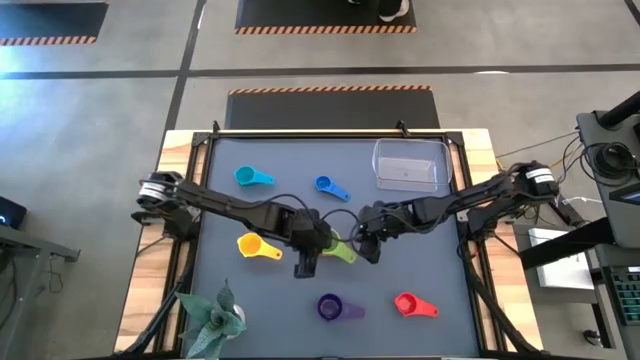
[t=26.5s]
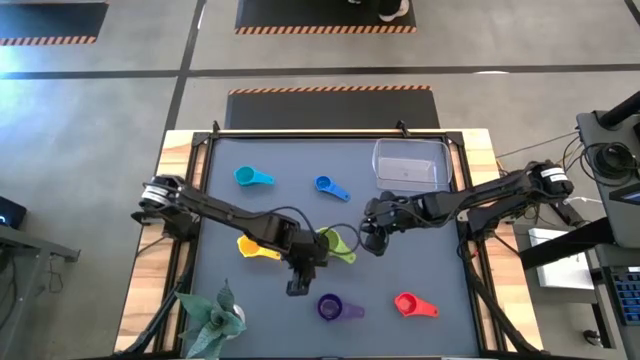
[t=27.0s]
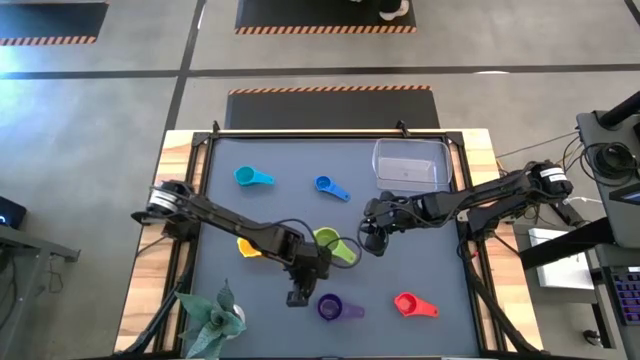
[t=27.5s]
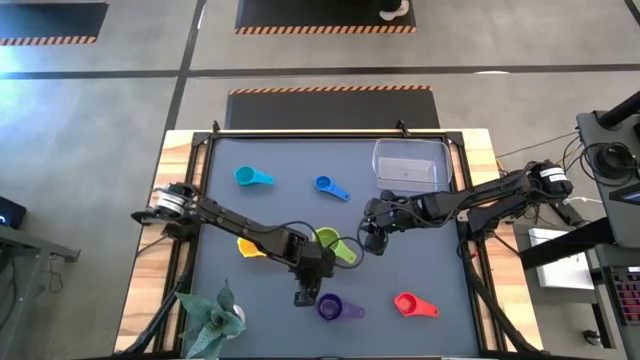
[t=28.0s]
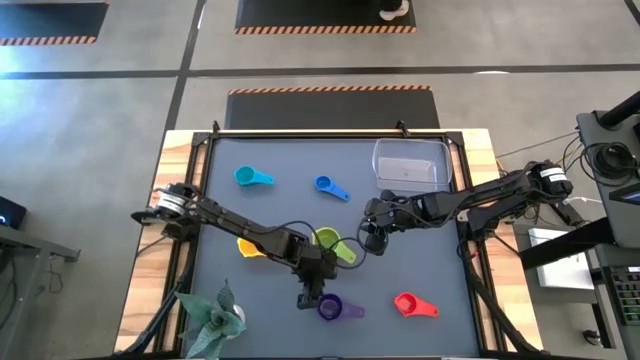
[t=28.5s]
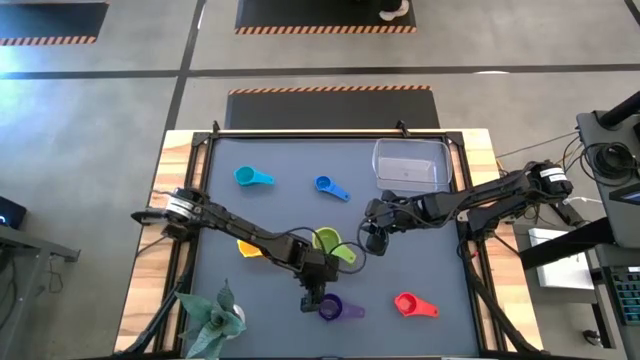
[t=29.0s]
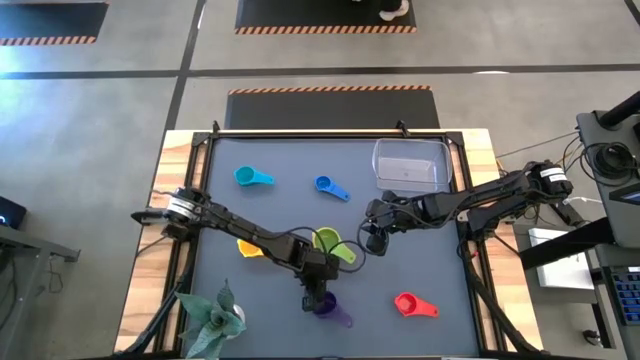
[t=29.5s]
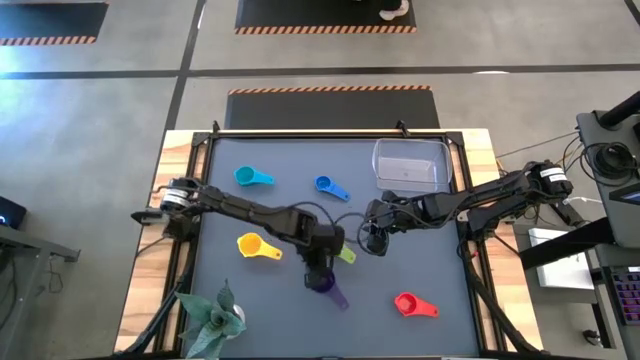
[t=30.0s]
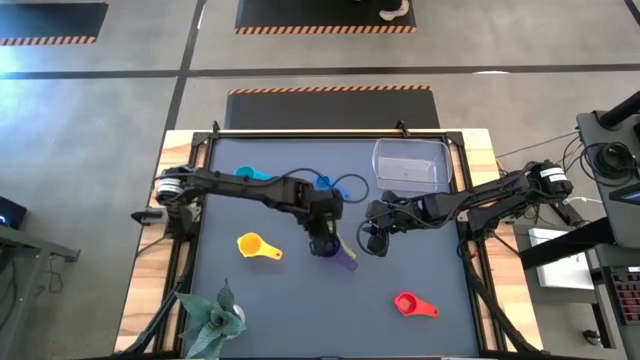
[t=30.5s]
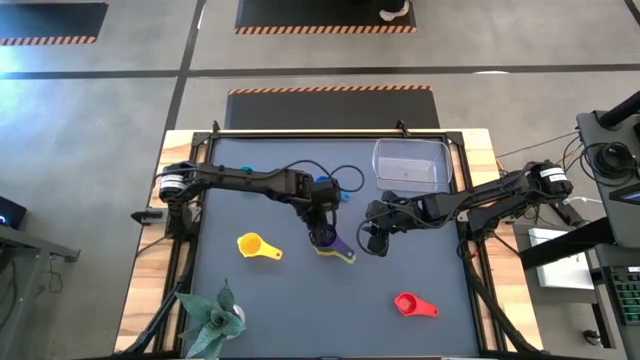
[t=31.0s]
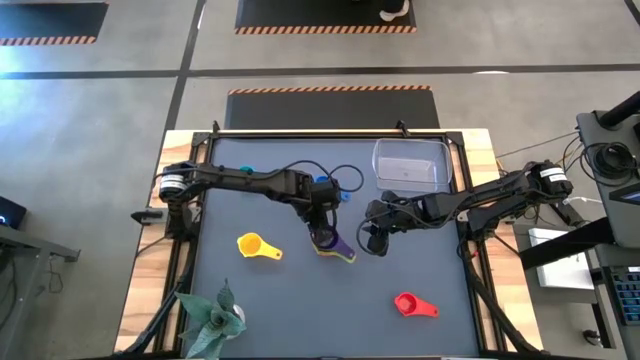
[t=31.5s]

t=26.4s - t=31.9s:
Task: Nest measuring cups in basket
Stack the violet measuring cup on top of the green measuring cup

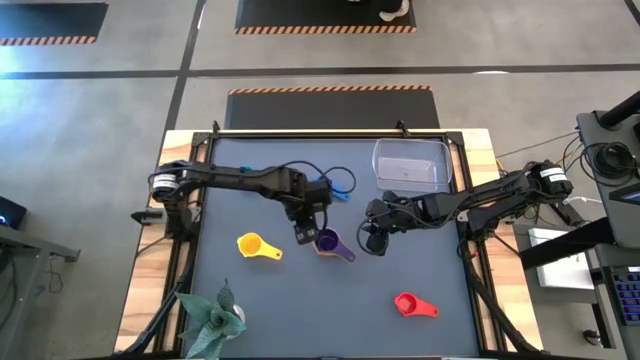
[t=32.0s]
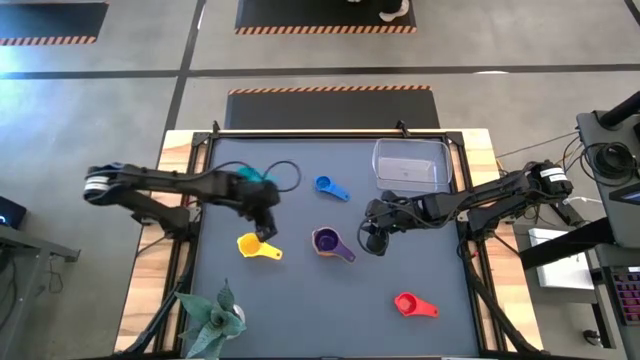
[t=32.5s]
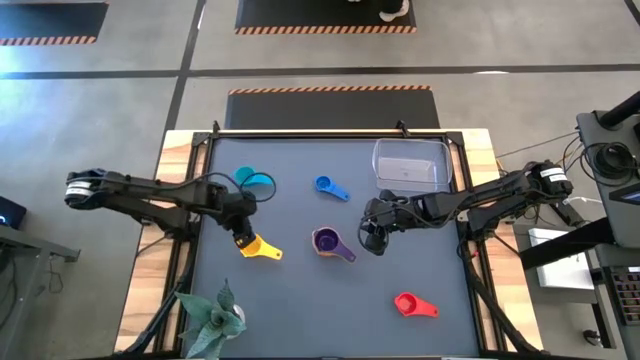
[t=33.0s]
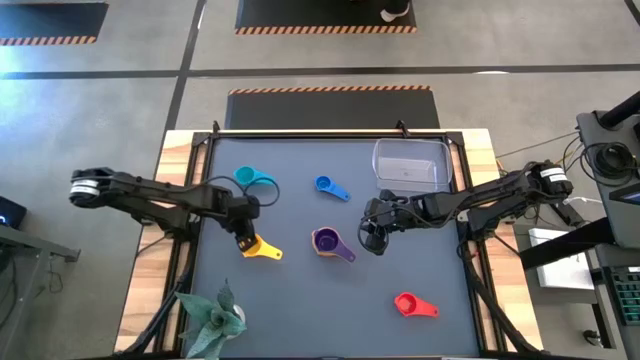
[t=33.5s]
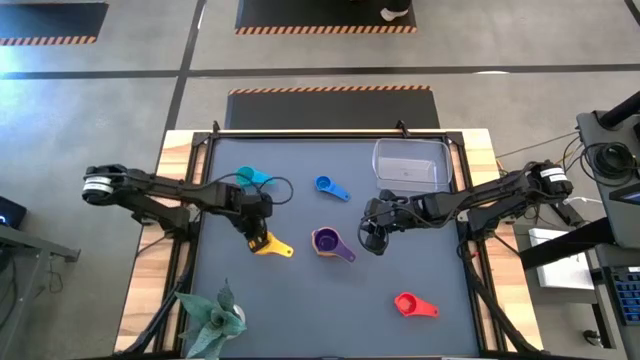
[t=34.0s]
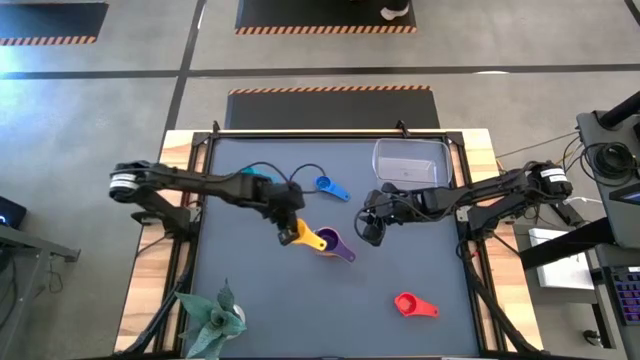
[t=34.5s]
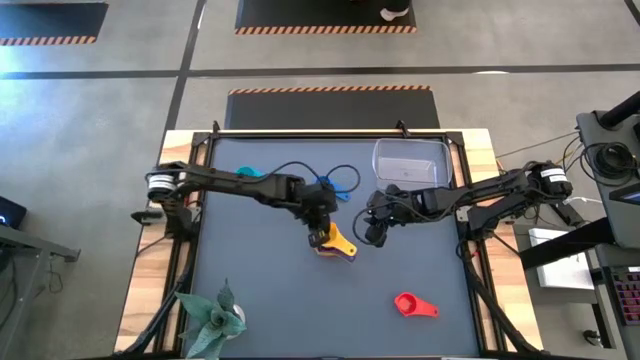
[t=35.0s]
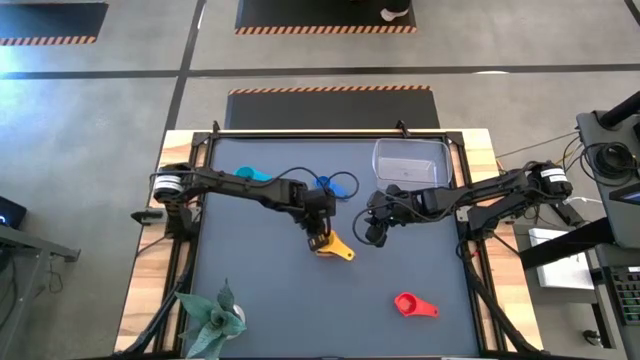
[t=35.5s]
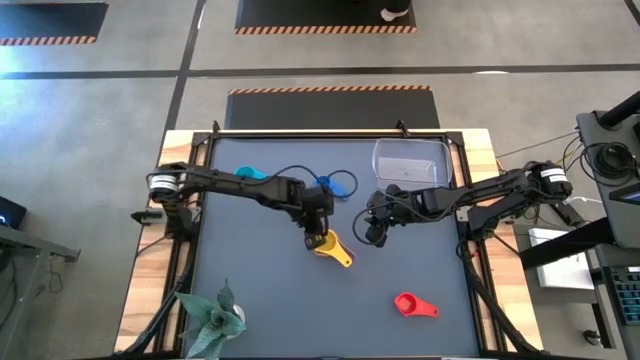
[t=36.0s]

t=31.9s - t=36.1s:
Stack the yellow measuring cup on top of the violet measuring cup

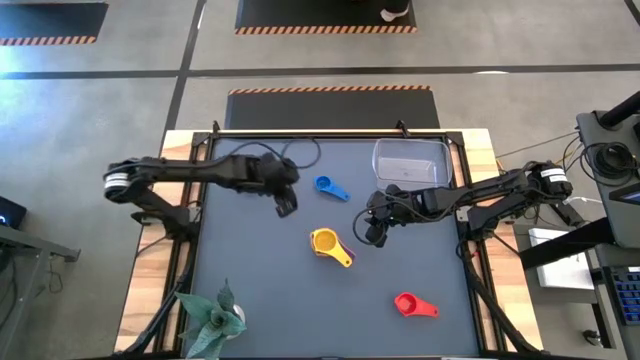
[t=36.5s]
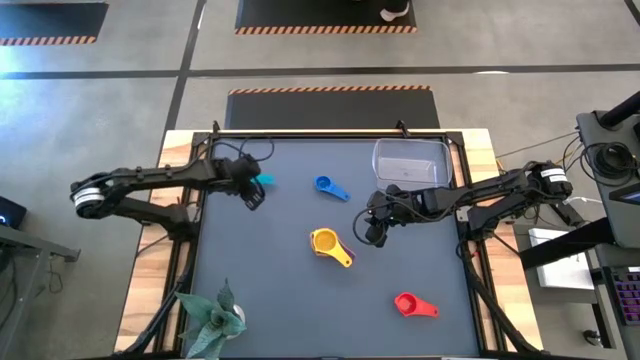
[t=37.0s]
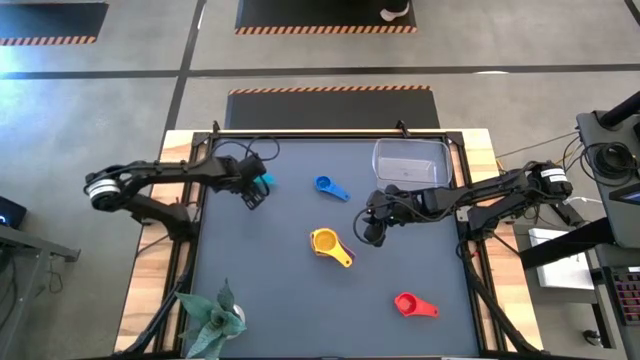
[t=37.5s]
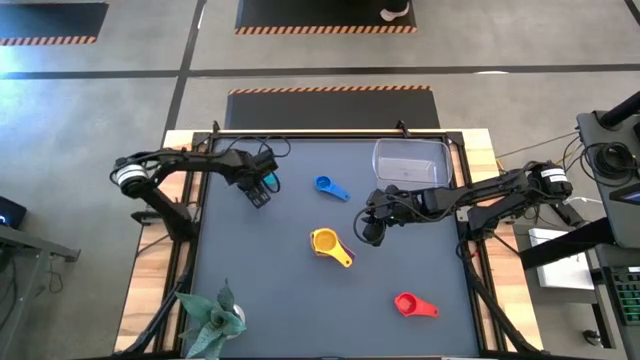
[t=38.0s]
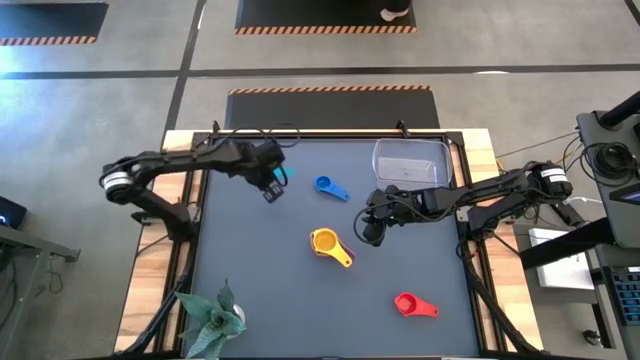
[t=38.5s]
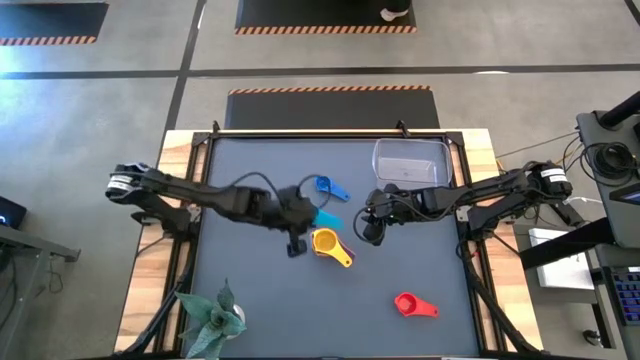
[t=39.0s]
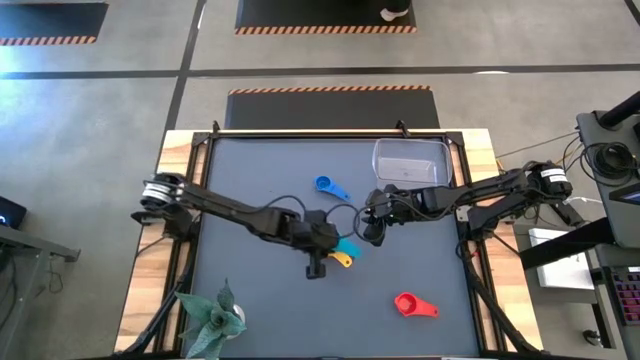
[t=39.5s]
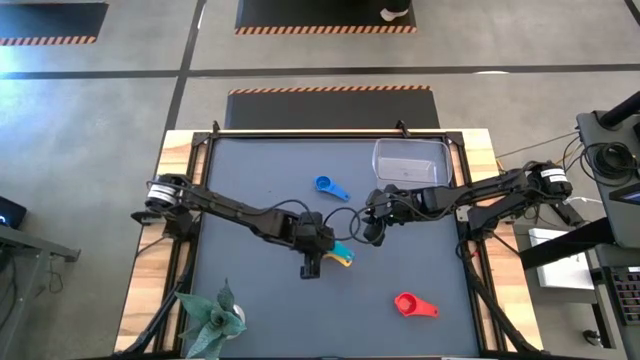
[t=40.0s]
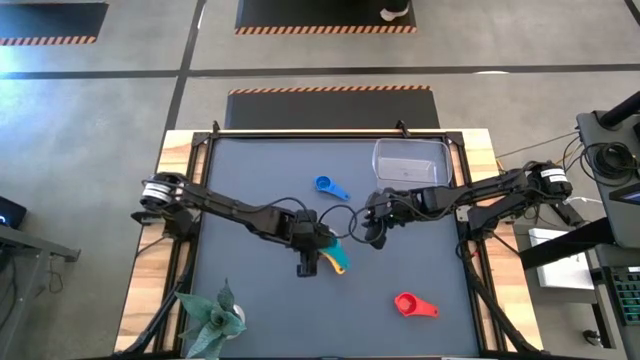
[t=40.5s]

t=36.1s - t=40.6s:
Stack the light blue measuring cup on top of the yellow measuring cup

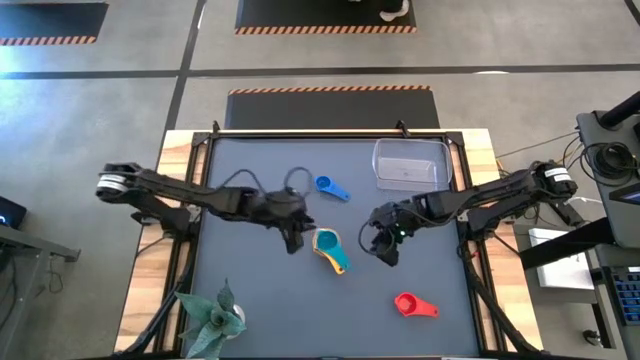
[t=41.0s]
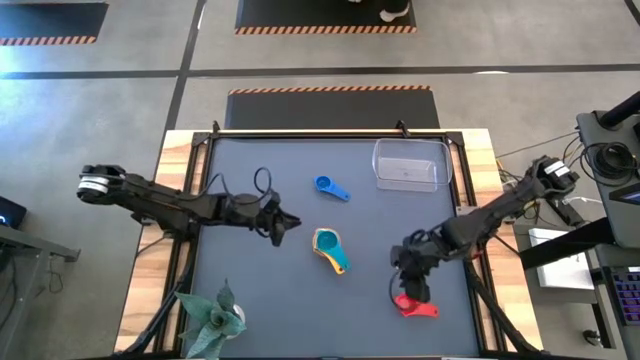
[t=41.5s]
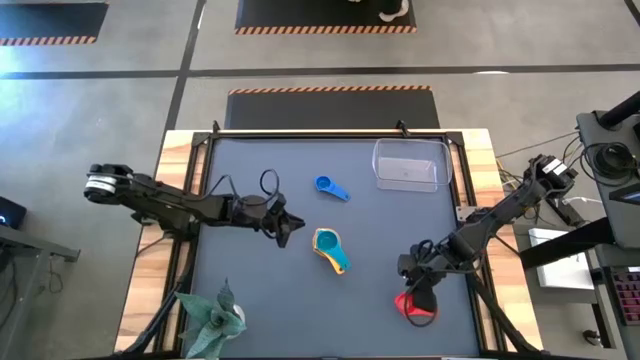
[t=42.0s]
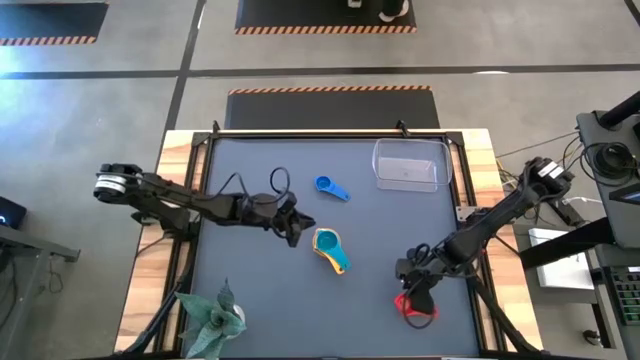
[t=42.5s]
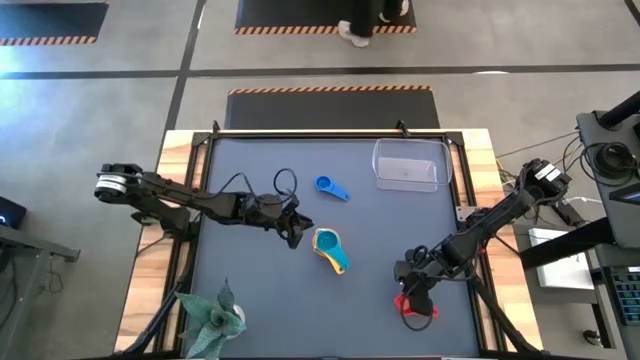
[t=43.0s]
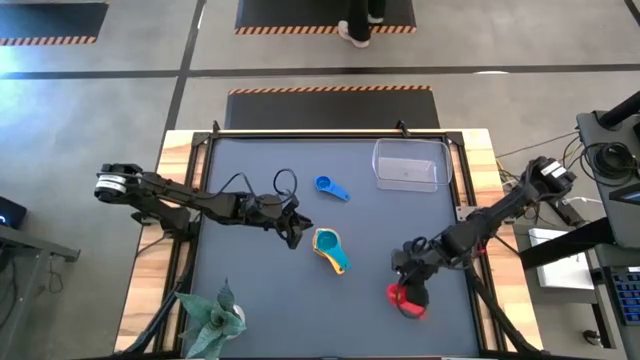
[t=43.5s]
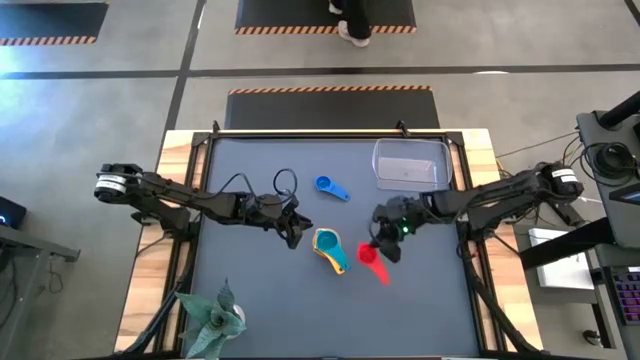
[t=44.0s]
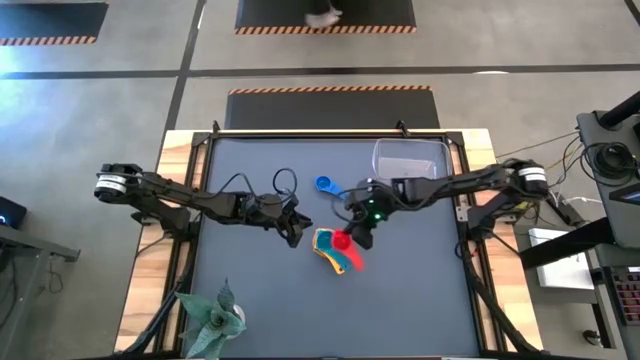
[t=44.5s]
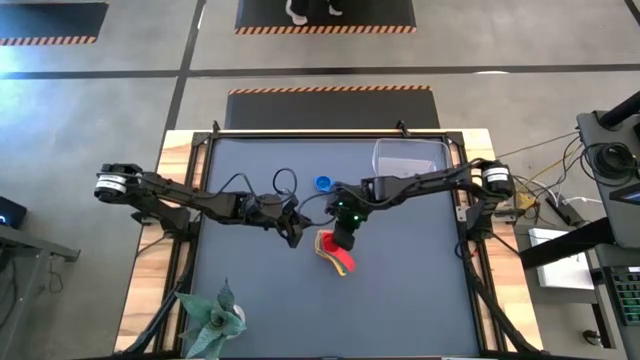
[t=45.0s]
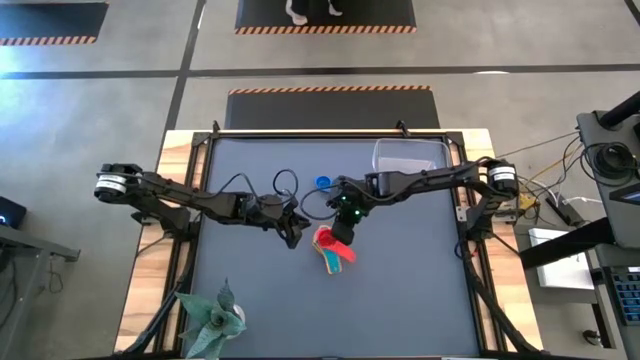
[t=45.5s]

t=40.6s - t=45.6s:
Stack the red measuring cup on top of the light blue measuring cup
